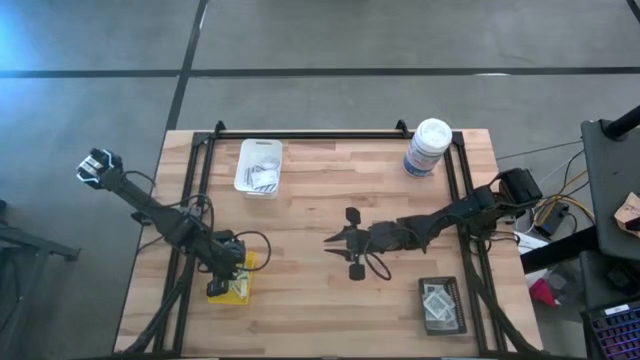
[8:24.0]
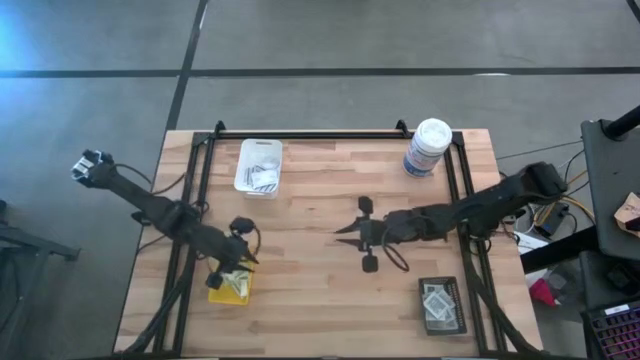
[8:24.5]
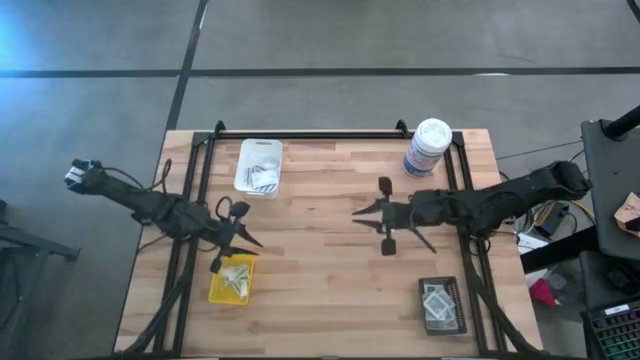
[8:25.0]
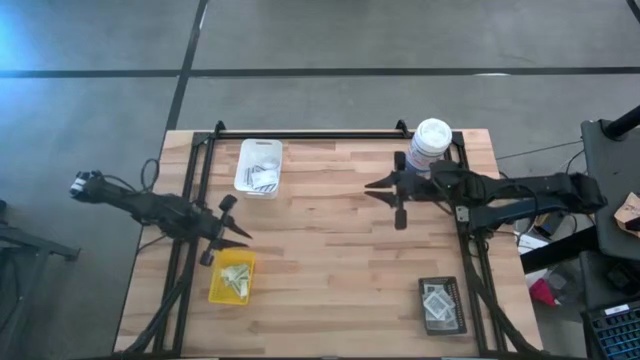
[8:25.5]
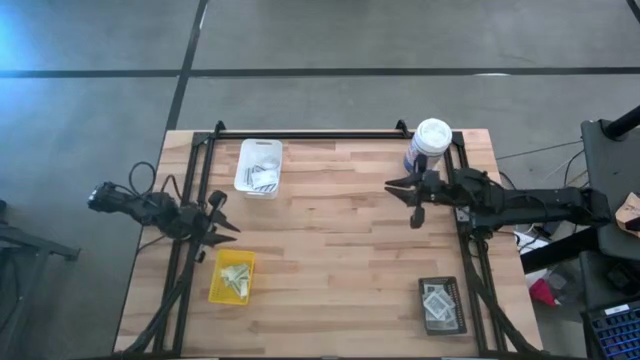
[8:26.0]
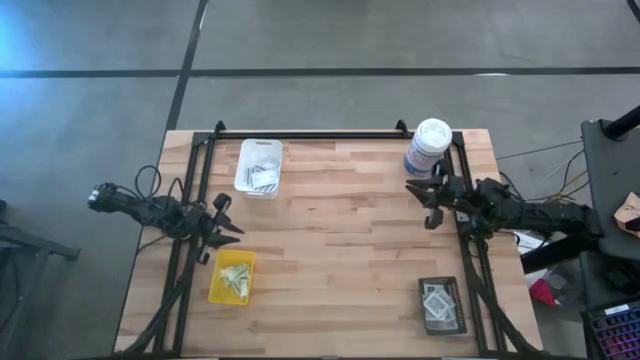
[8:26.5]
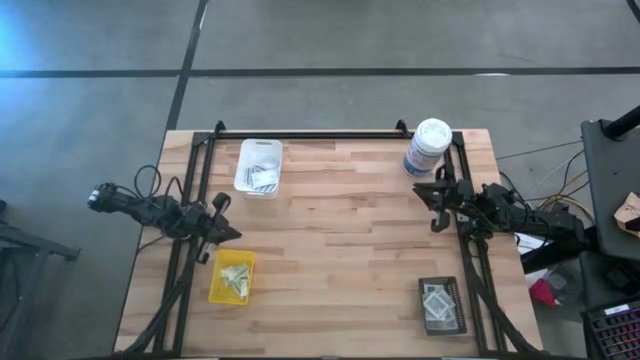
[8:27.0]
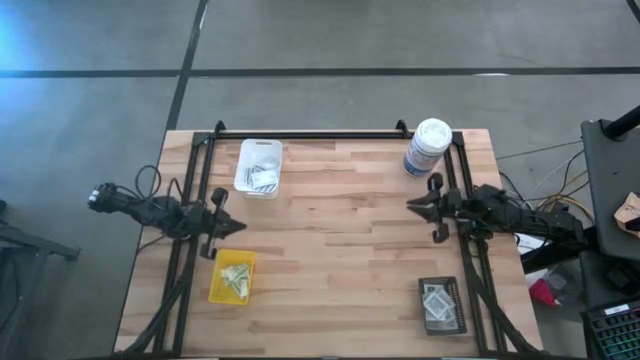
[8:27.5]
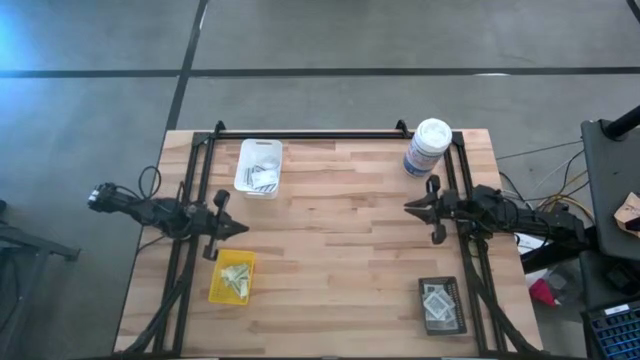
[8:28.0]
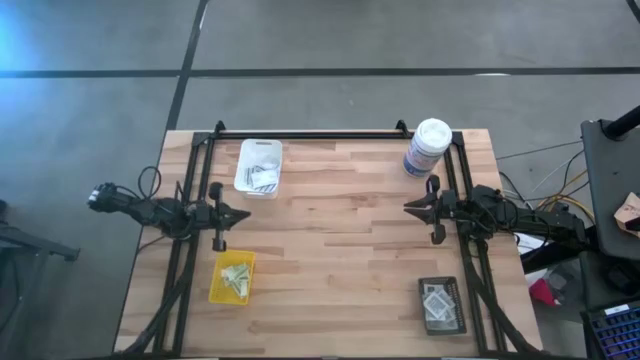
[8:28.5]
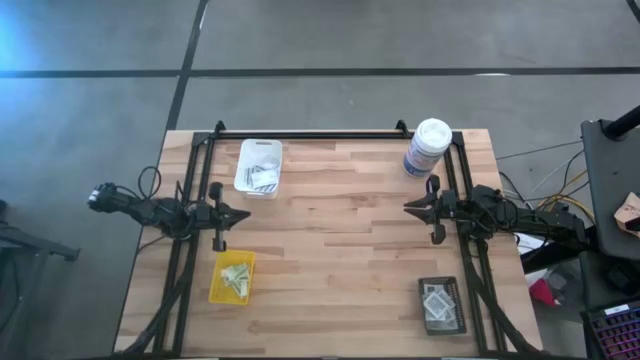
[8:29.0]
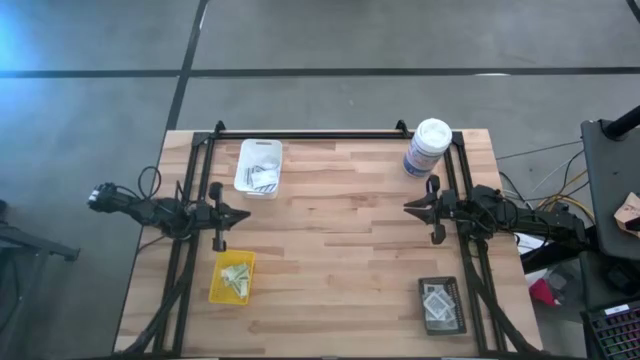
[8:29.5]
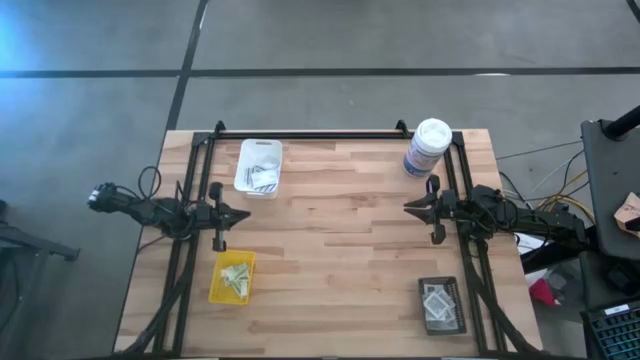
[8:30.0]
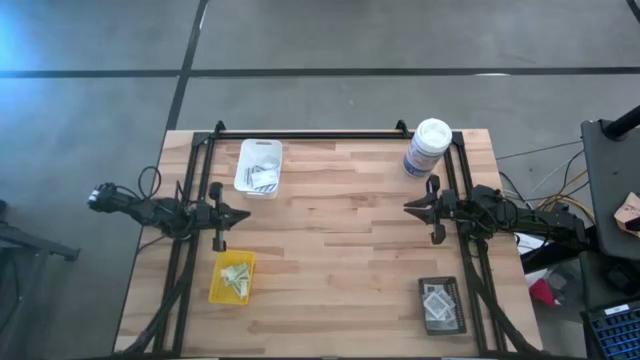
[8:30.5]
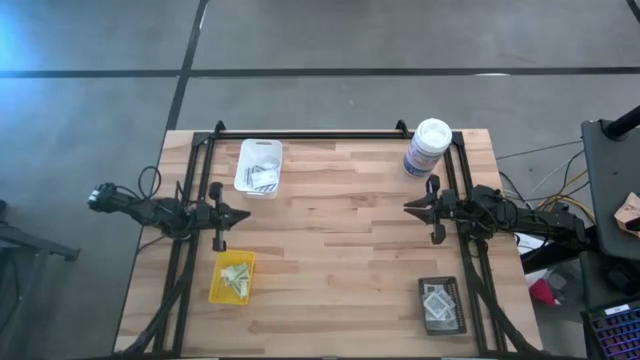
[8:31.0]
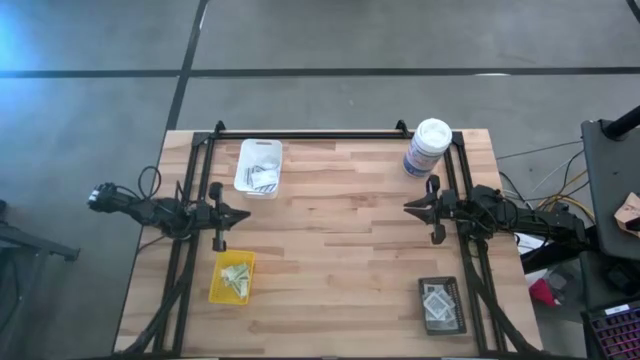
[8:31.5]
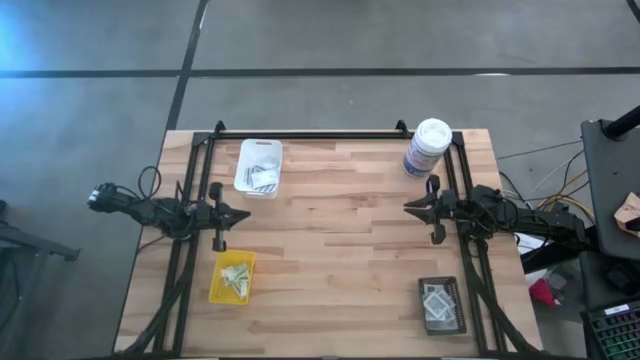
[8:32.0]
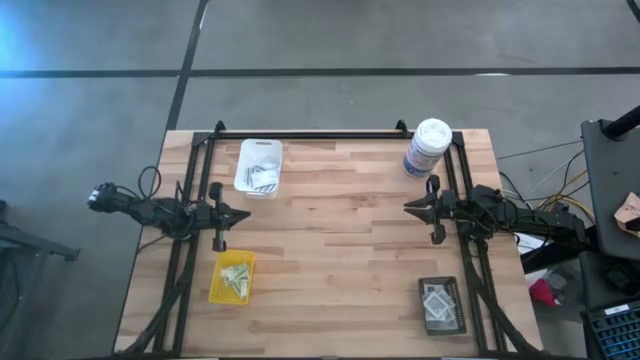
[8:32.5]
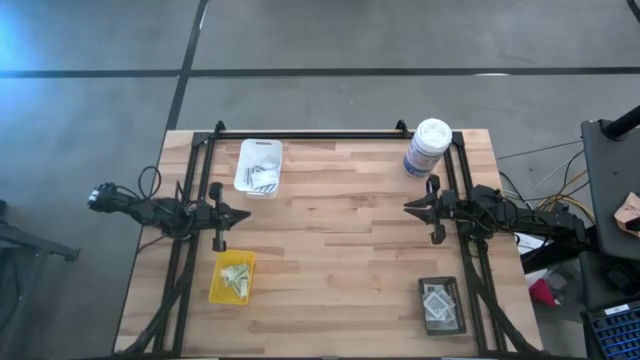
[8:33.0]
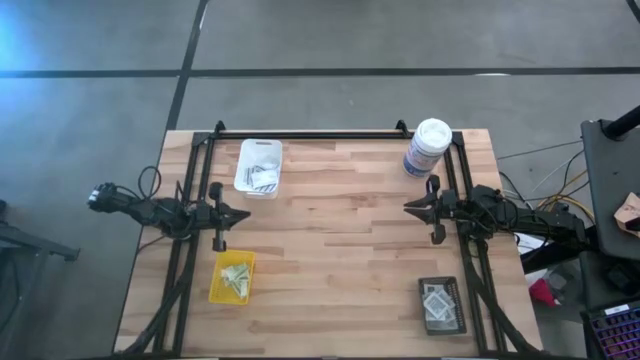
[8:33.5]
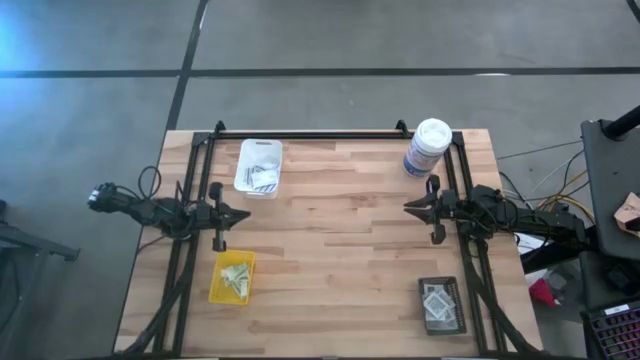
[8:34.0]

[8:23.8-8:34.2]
Task: Pick & Place First Aid Supplies
Return to Home Position

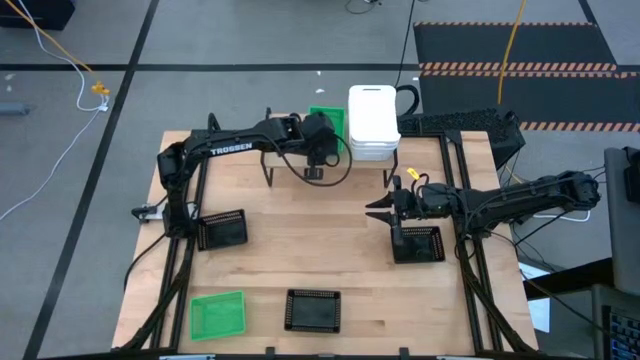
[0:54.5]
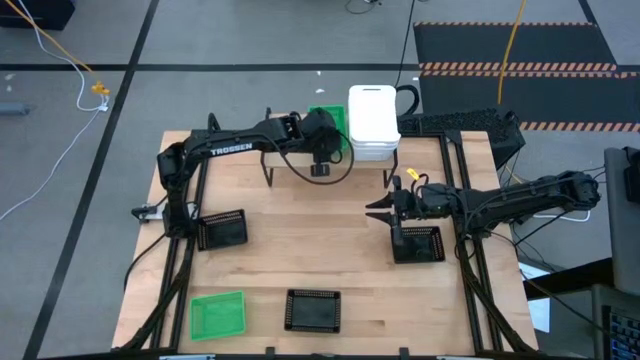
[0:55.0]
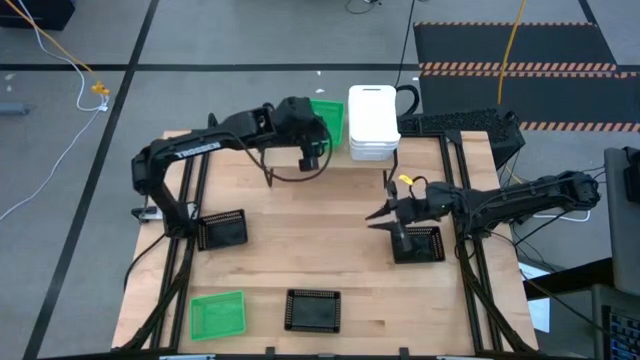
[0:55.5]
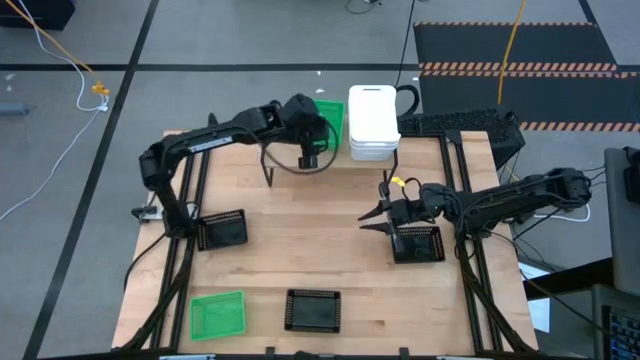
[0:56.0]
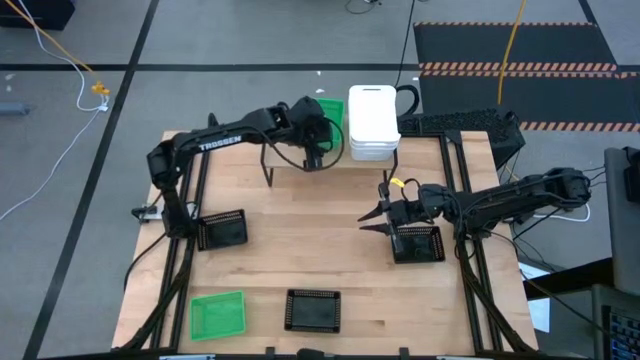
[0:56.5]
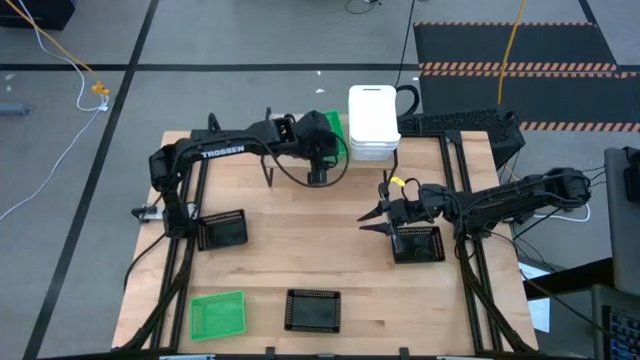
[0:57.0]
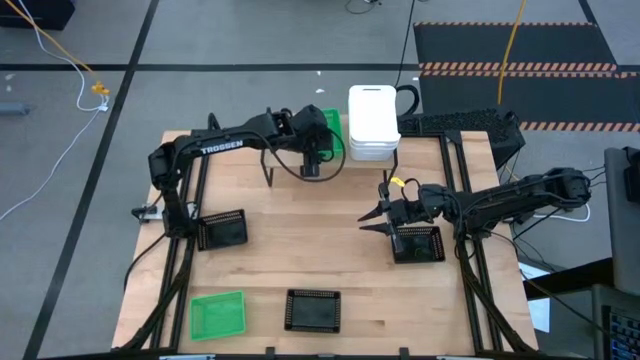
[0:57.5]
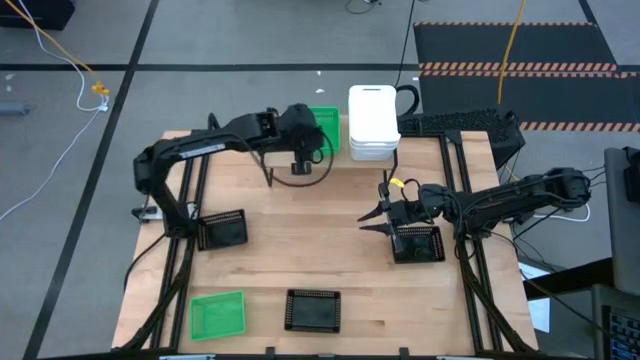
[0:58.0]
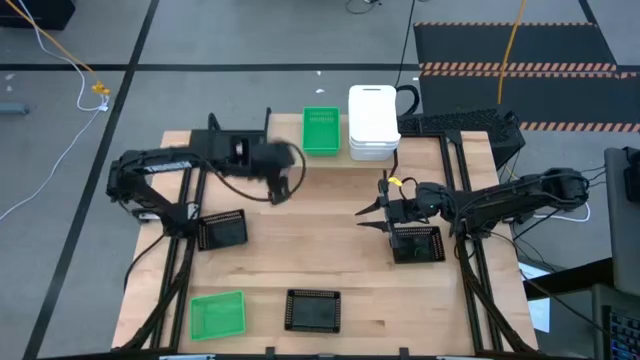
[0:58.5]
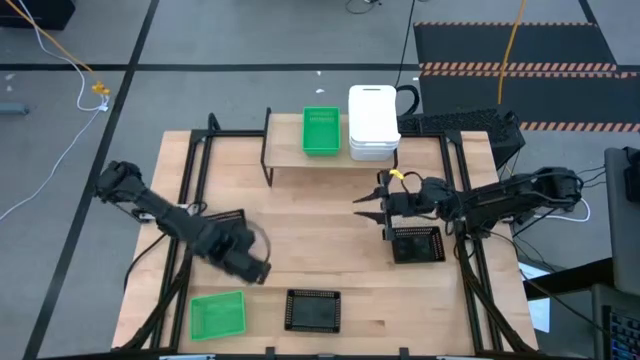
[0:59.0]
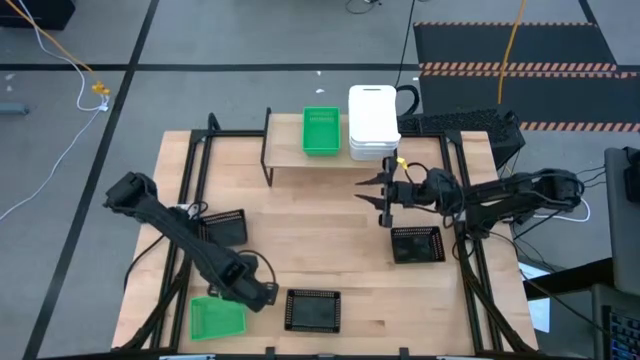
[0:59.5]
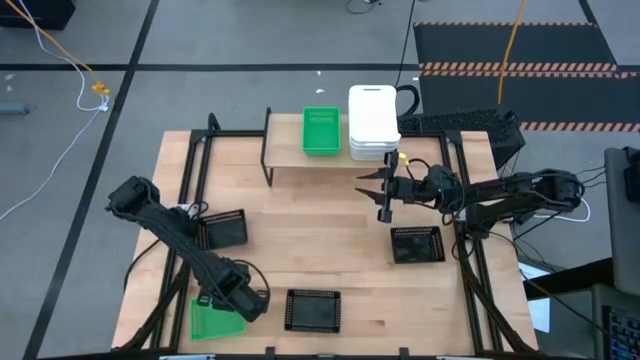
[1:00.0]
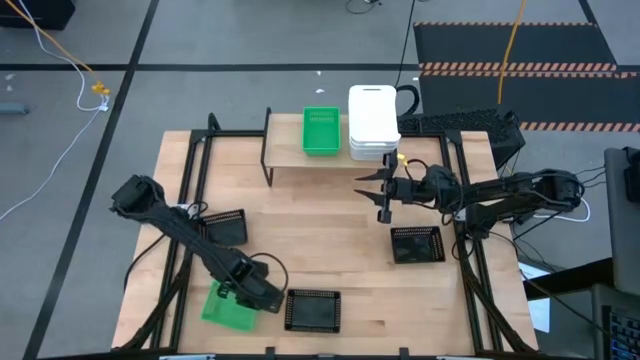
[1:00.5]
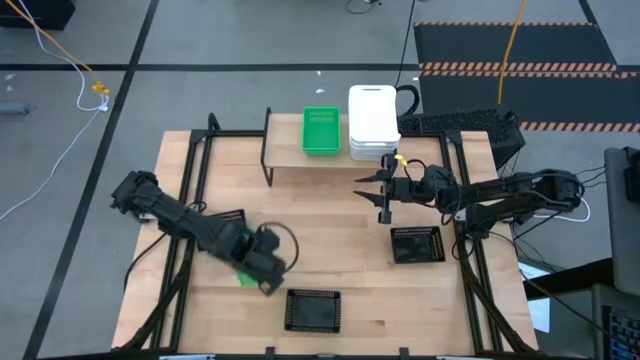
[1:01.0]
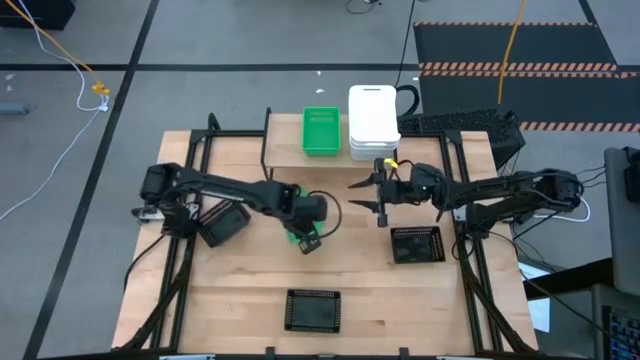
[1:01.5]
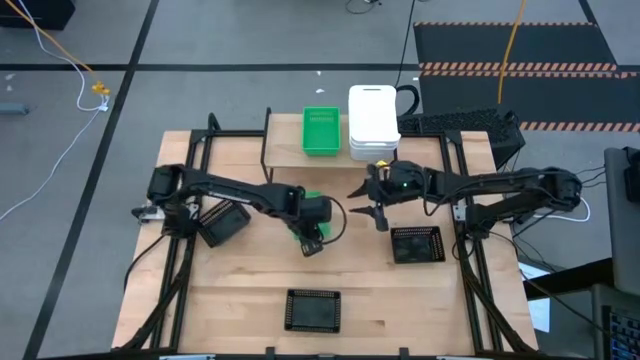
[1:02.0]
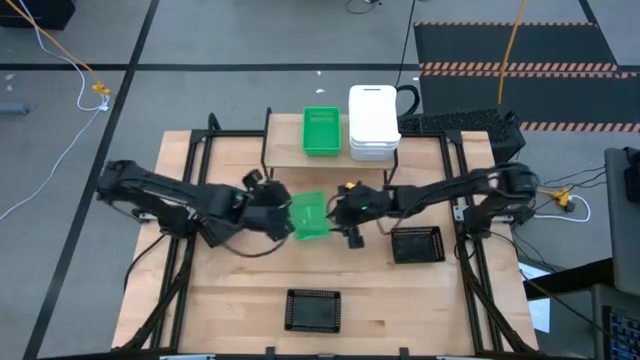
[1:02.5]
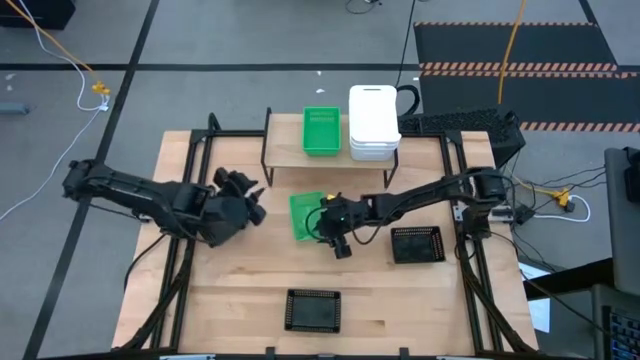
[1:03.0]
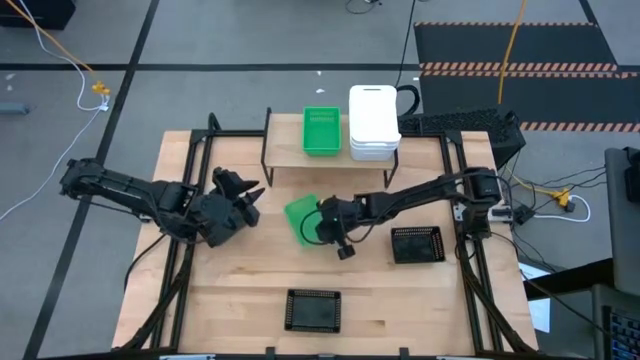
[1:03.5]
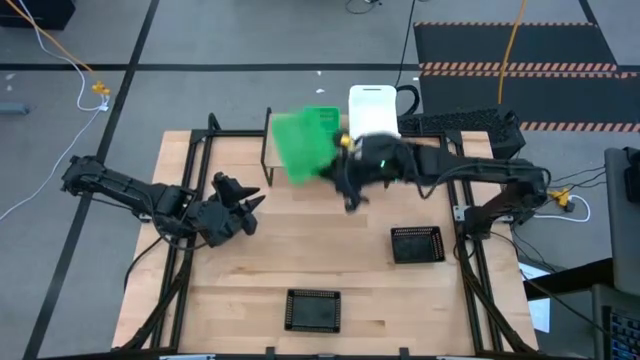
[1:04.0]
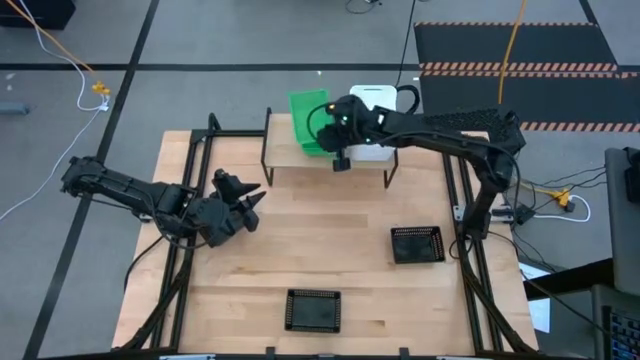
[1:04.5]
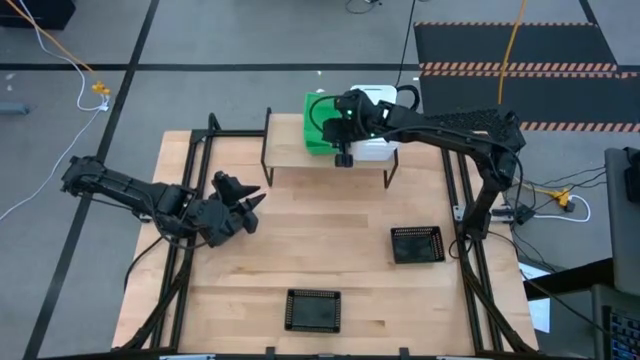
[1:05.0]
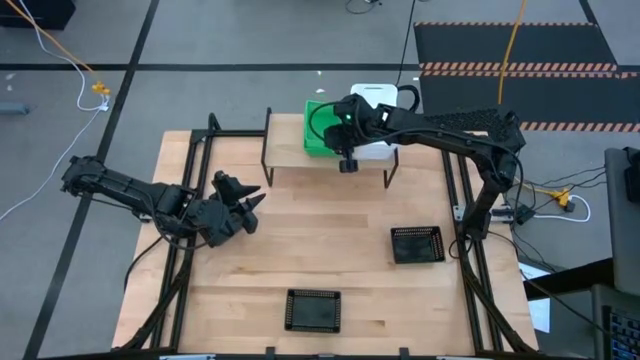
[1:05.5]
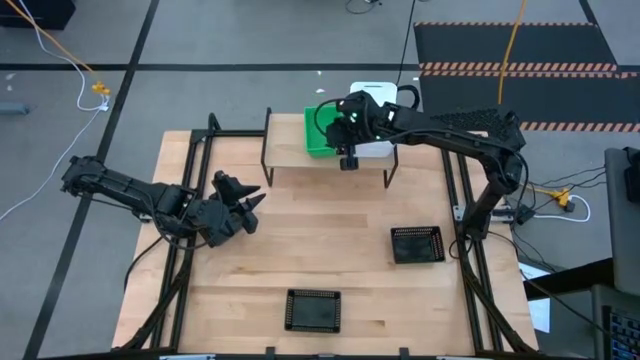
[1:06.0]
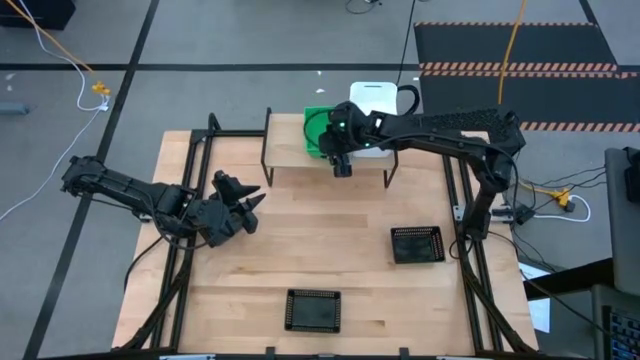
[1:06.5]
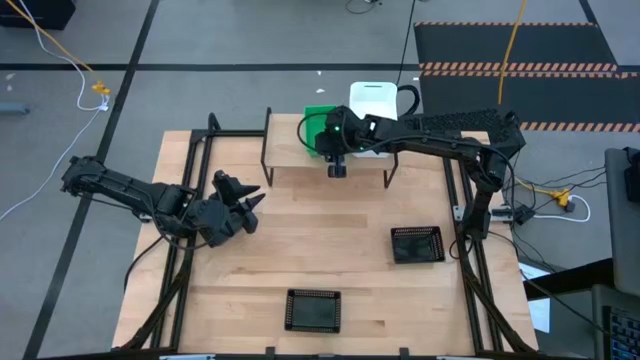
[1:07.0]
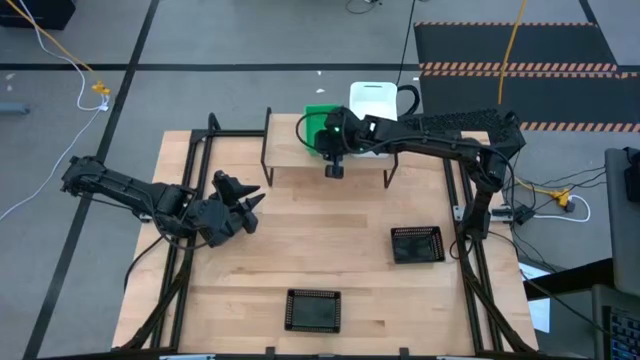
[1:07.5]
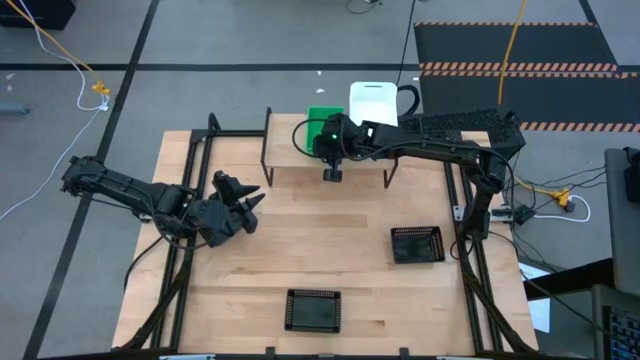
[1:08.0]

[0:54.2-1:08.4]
Task: Stack baskets on shelf by color
Stack the green bin on top of the other green bin on the shelf
